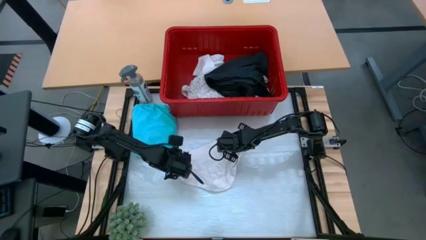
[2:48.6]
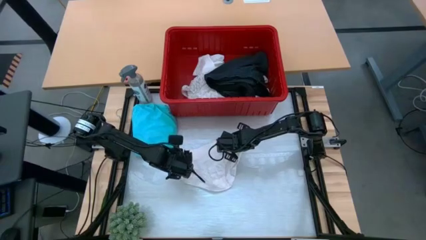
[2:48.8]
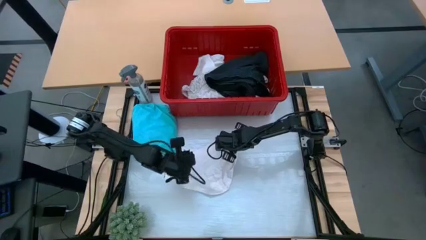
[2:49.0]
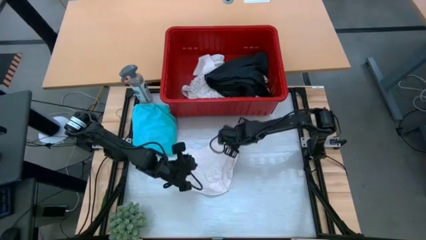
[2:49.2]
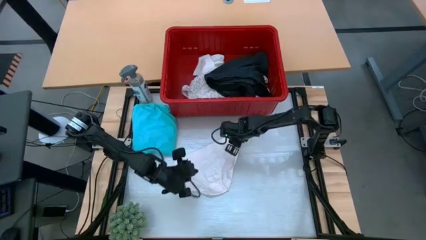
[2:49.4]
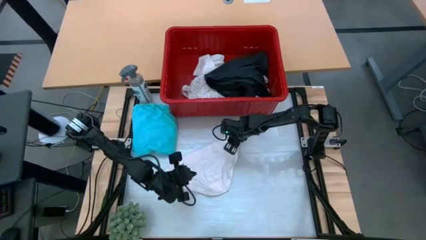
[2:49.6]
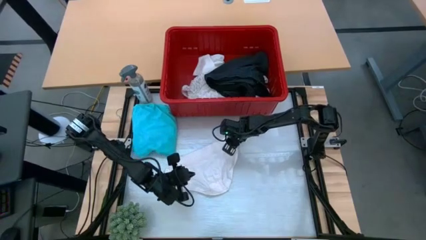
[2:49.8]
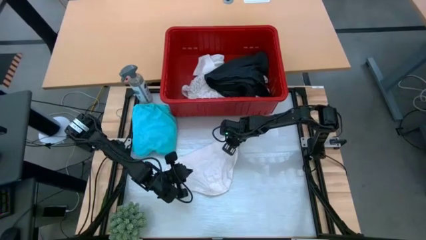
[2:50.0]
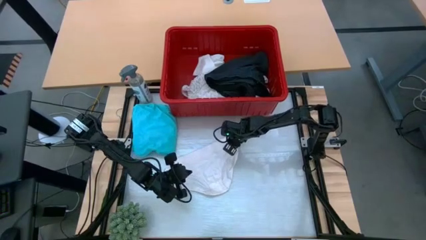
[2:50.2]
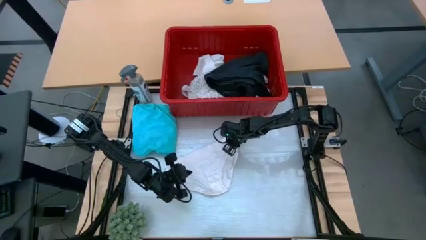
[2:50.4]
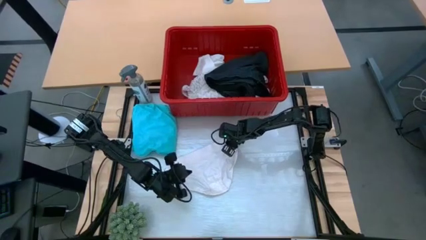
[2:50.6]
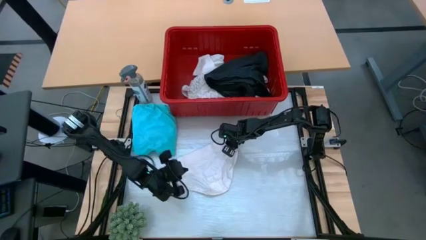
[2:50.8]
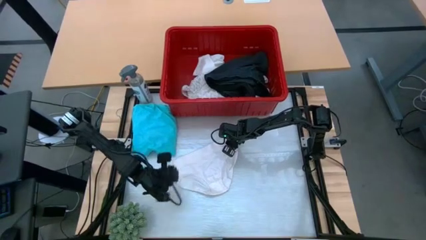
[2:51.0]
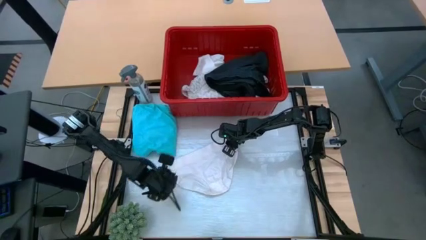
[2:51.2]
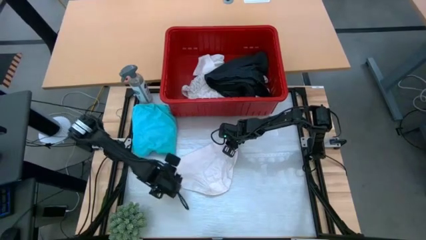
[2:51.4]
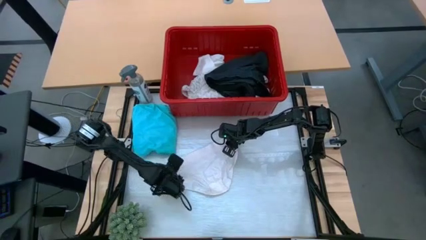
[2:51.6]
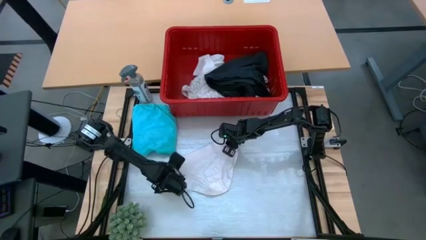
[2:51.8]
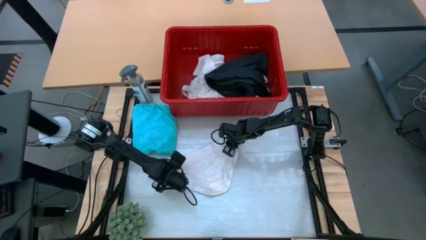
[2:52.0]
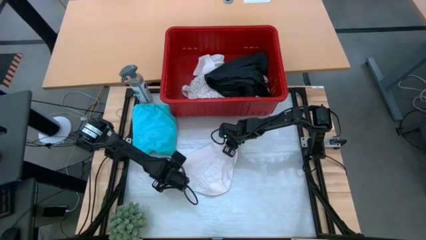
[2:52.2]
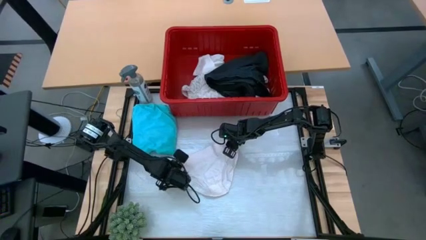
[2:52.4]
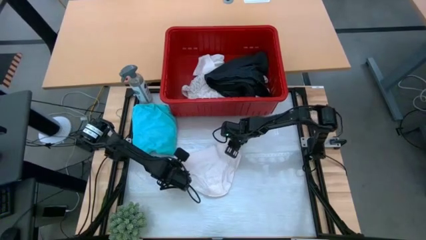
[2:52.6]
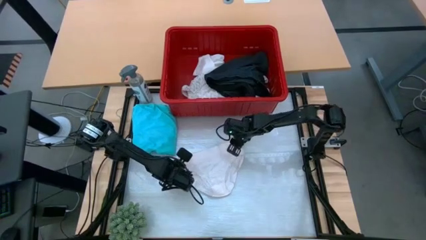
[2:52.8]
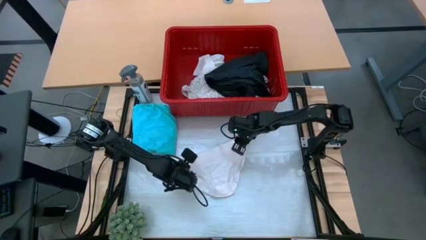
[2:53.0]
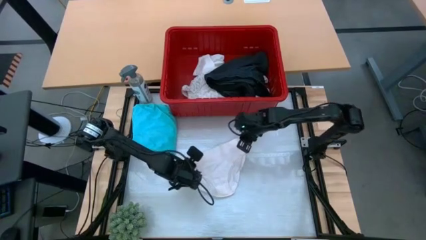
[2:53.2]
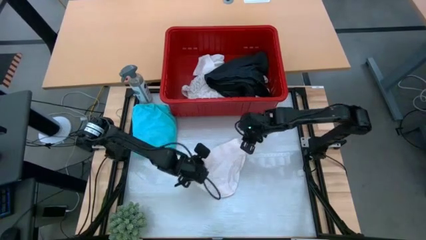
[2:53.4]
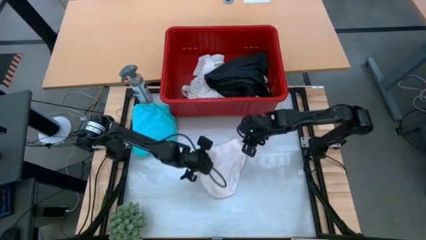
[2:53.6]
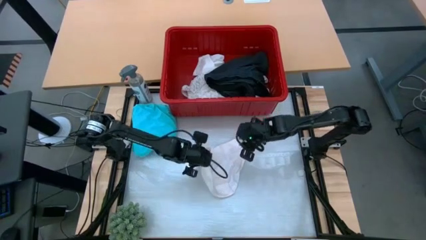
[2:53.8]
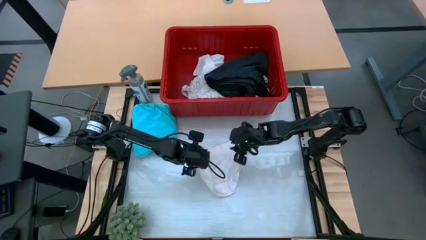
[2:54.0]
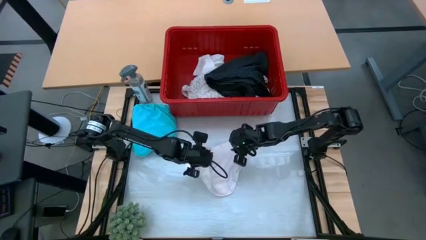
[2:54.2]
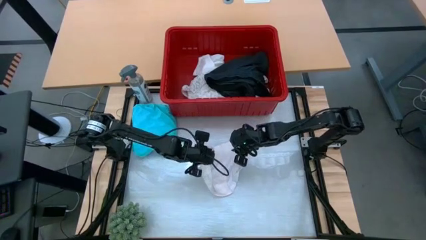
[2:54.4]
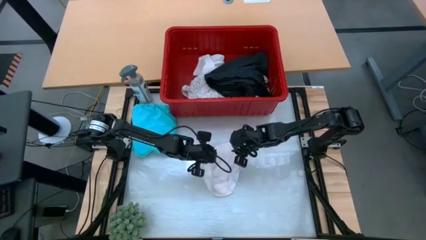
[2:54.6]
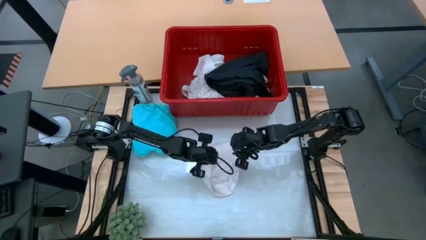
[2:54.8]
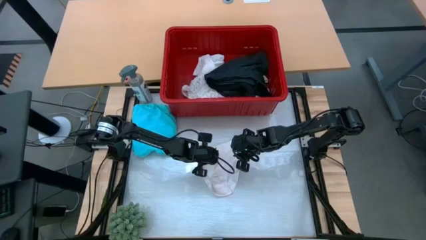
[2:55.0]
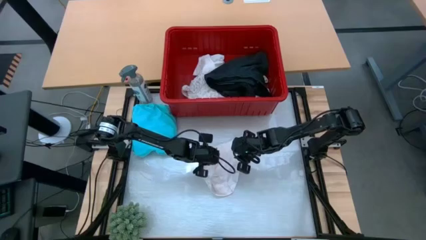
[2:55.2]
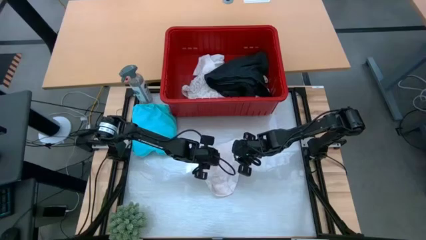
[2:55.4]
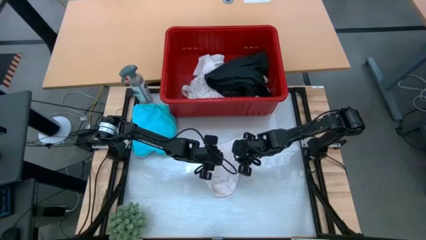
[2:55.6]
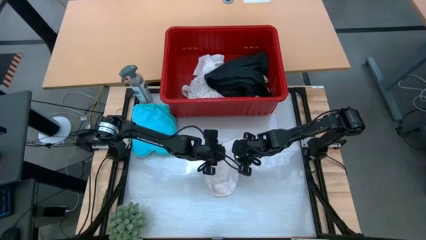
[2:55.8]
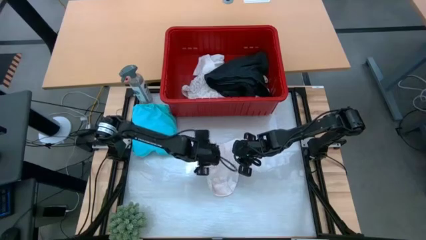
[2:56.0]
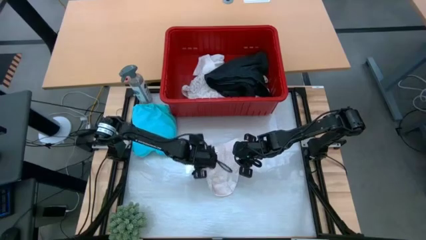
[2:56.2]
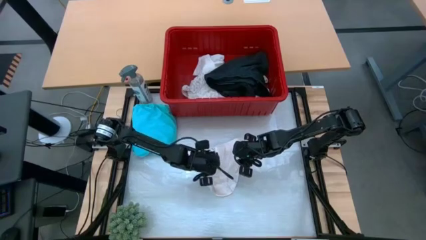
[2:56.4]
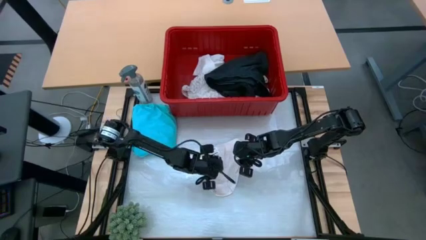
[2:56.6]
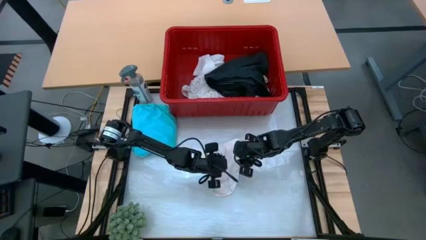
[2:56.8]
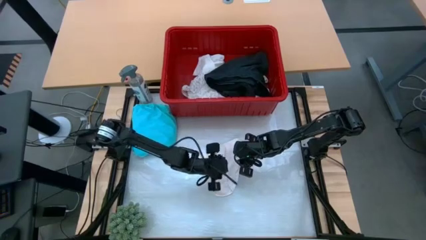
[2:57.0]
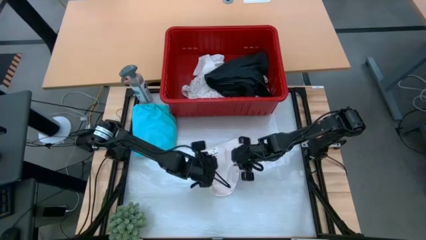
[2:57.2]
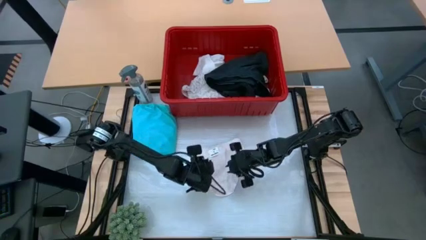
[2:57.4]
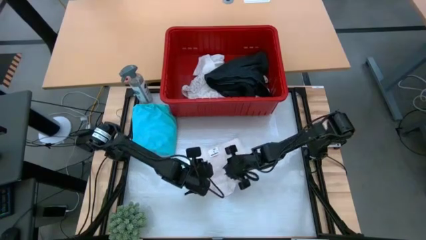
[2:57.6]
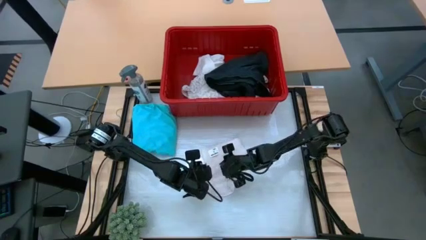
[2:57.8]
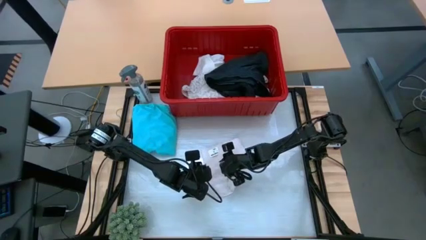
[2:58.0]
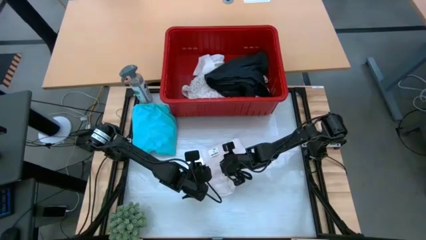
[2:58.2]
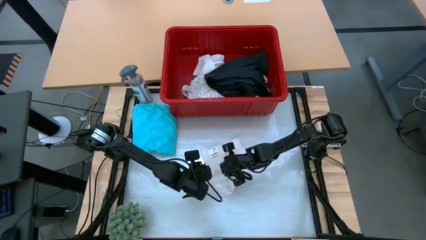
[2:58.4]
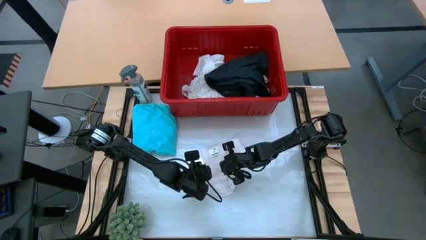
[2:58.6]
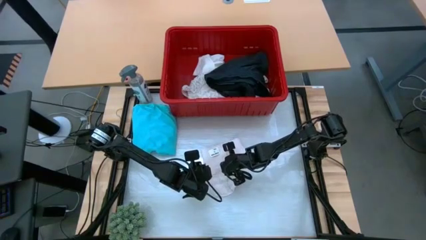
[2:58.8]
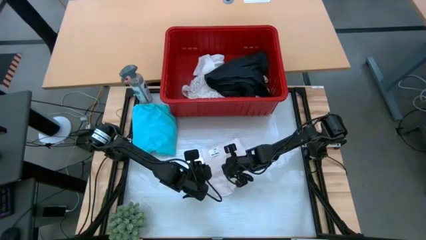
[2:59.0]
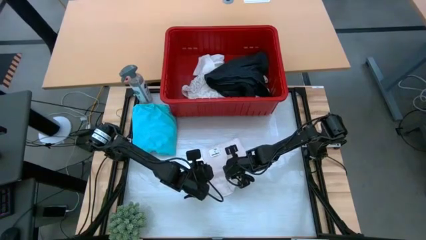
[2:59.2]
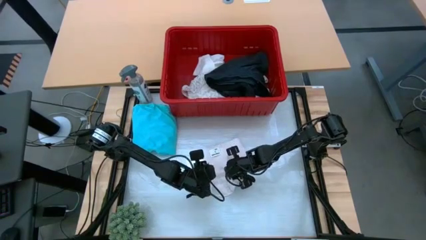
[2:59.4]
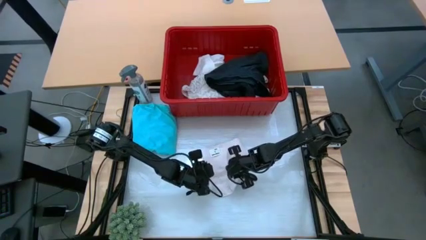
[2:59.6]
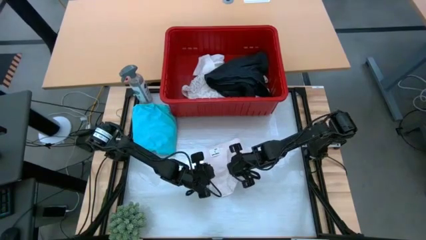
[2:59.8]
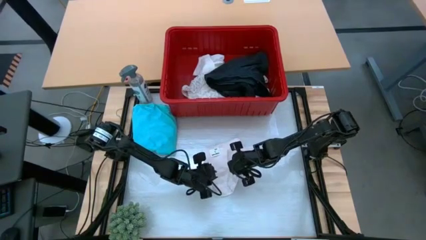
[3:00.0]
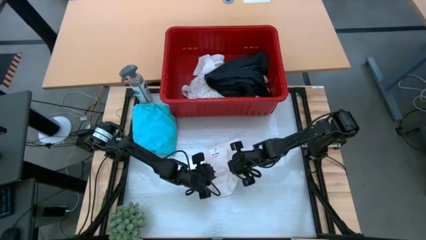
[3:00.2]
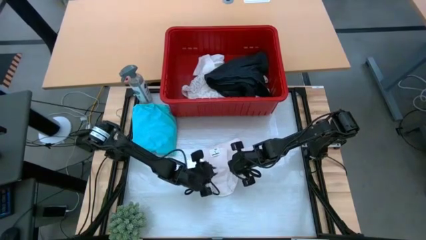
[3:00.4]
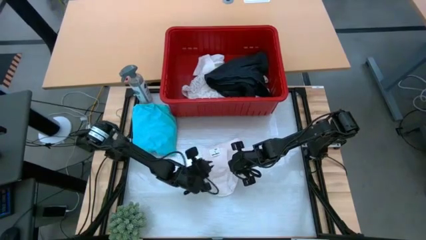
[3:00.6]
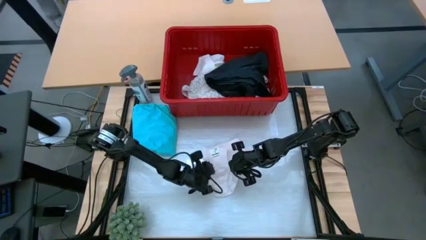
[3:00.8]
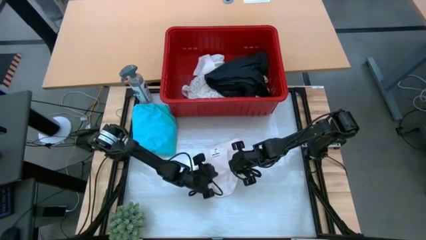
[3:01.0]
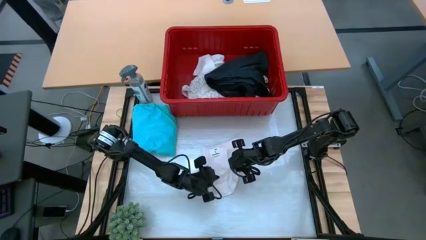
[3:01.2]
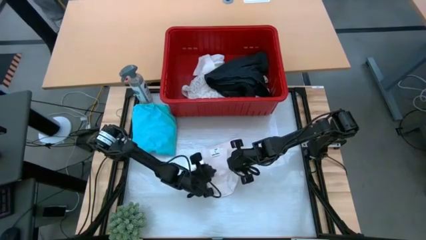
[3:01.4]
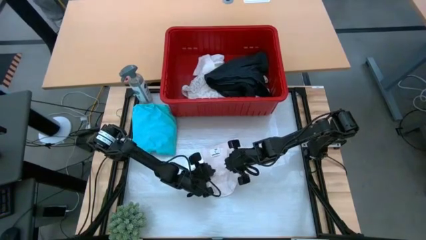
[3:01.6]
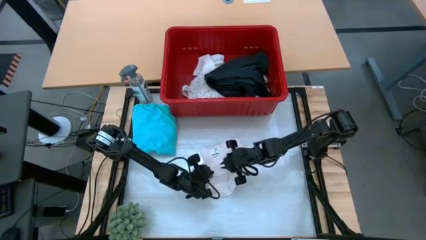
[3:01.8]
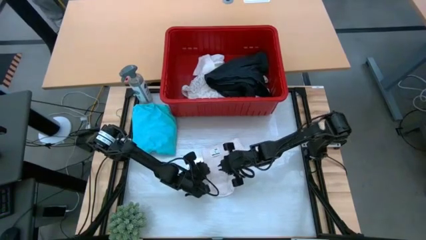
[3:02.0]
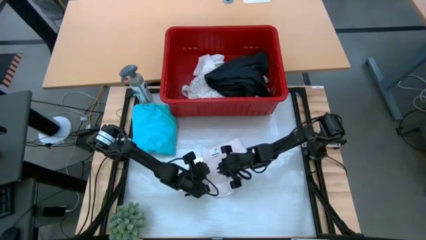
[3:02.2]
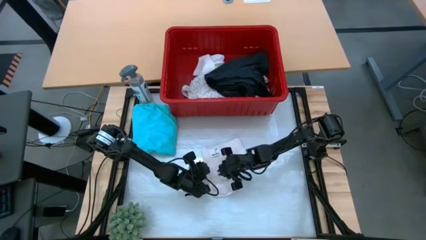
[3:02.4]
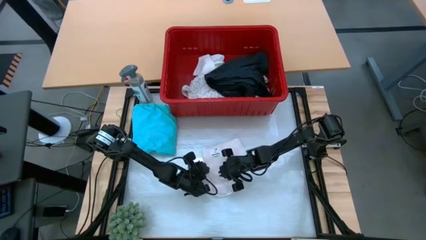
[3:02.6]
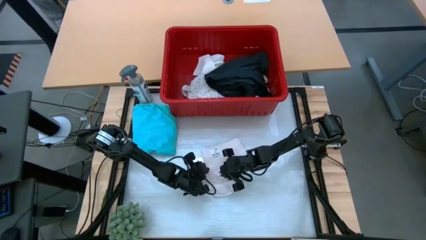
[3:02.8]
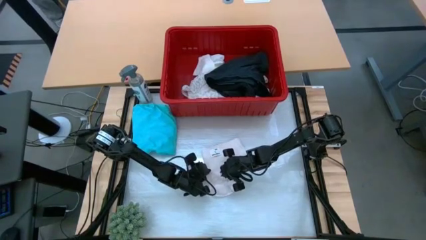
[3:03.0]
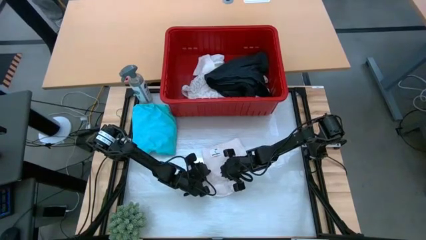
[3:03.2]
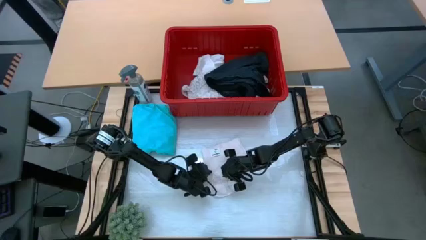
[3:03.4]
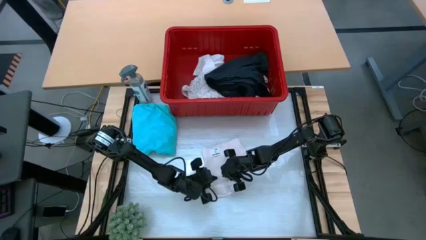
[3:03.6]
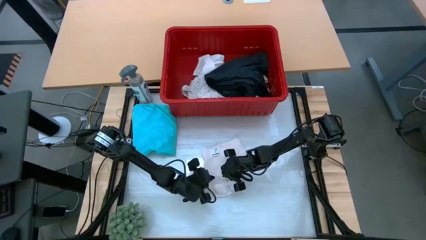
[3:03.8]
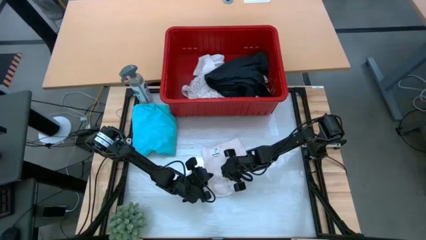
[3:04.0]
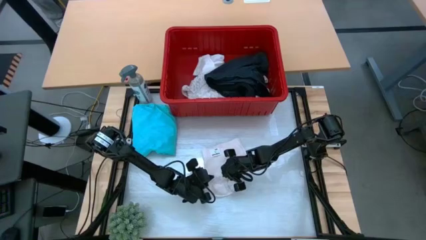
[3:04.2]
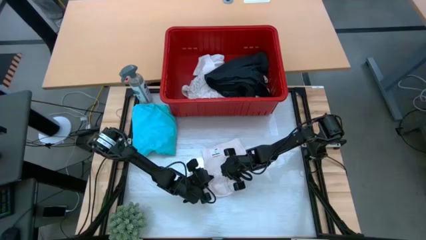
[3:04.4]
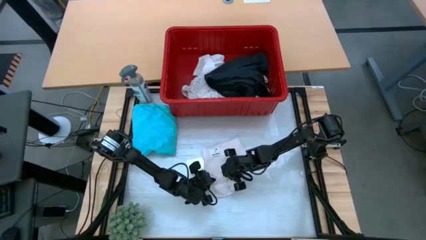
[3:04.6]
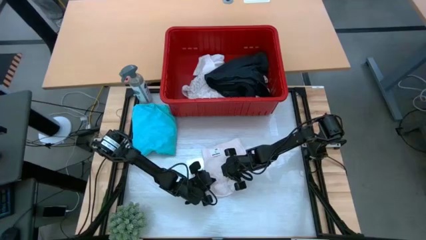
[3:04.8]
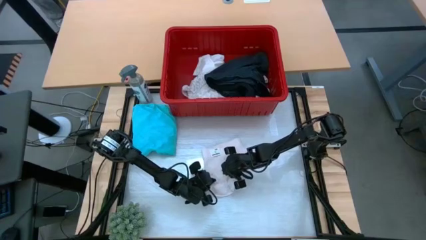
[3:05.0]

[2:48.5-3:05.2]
Task: Fold laundry
Fold the white underwear
